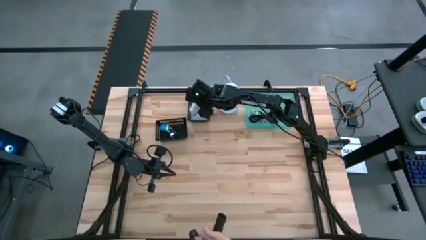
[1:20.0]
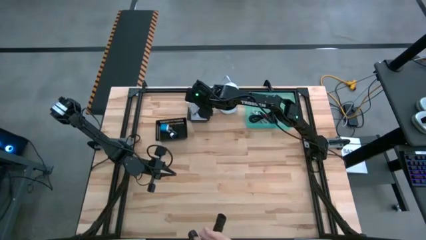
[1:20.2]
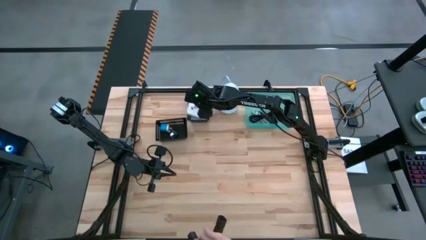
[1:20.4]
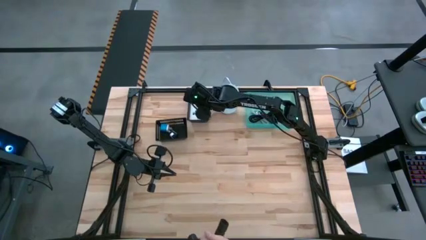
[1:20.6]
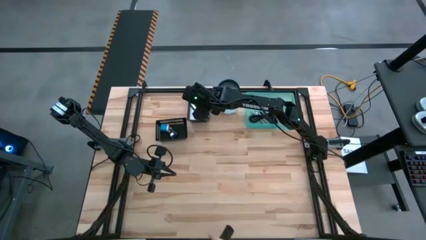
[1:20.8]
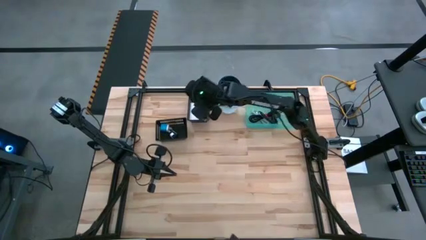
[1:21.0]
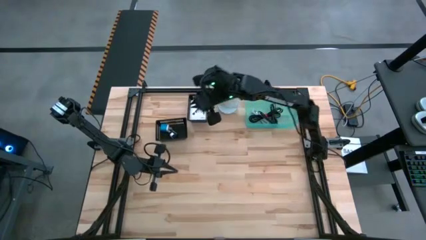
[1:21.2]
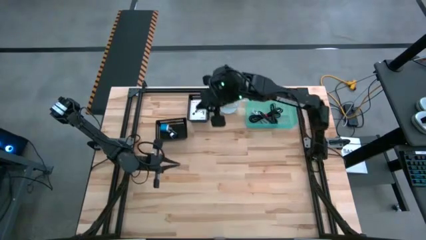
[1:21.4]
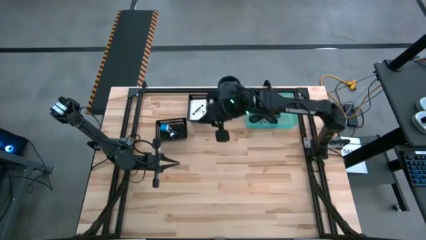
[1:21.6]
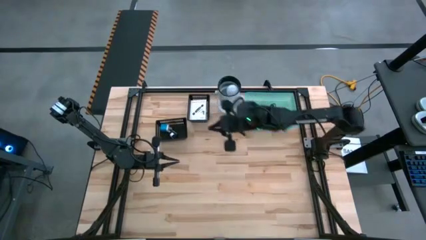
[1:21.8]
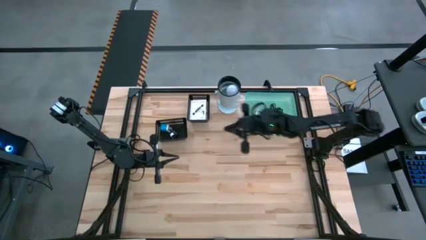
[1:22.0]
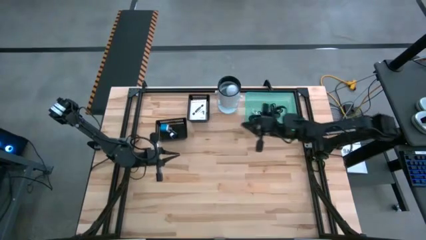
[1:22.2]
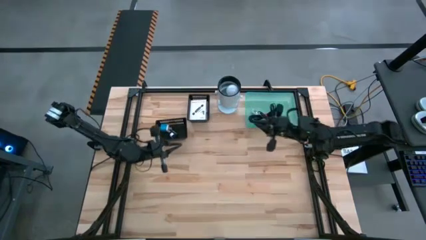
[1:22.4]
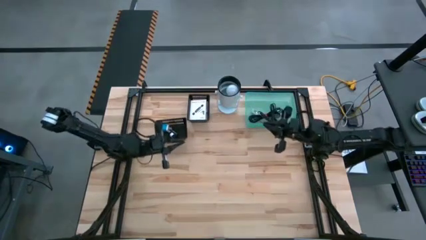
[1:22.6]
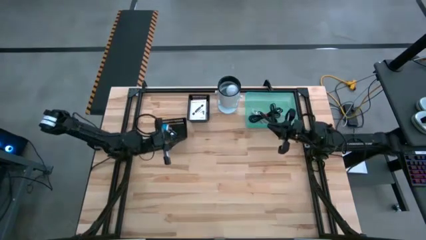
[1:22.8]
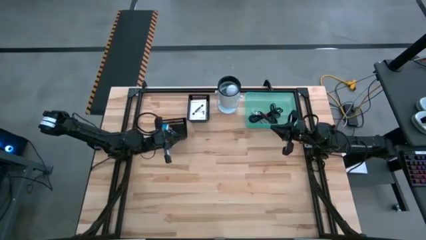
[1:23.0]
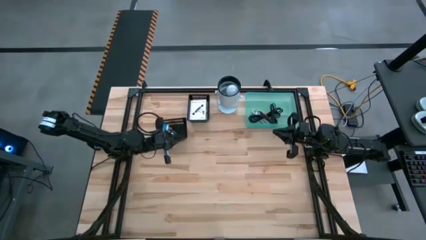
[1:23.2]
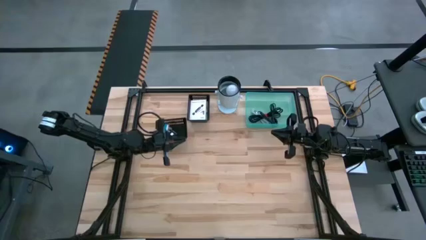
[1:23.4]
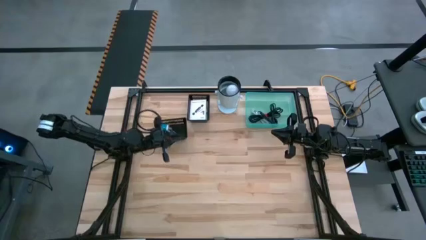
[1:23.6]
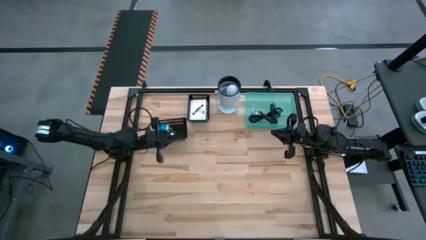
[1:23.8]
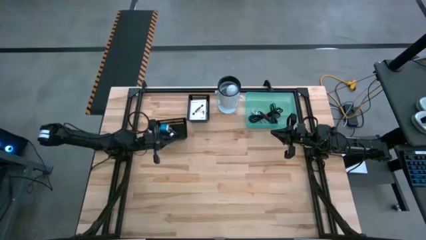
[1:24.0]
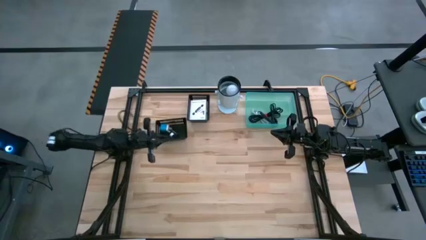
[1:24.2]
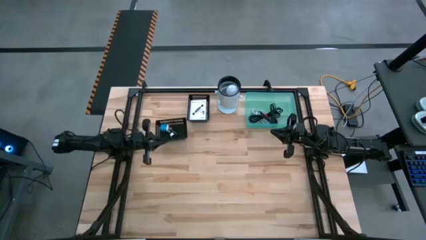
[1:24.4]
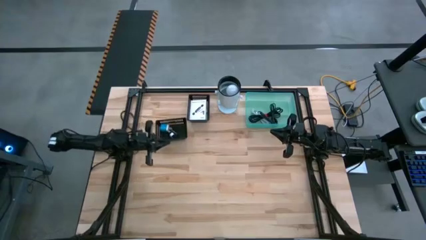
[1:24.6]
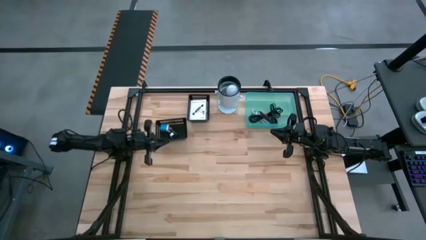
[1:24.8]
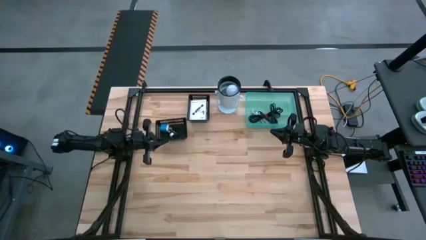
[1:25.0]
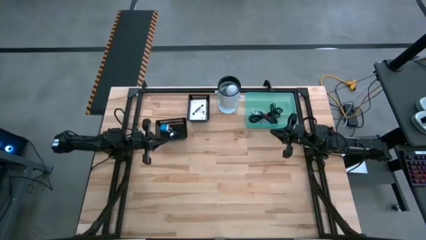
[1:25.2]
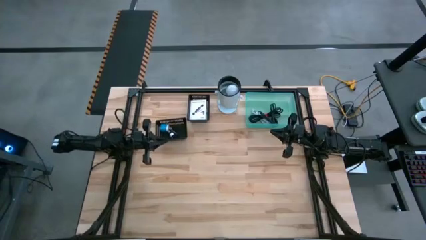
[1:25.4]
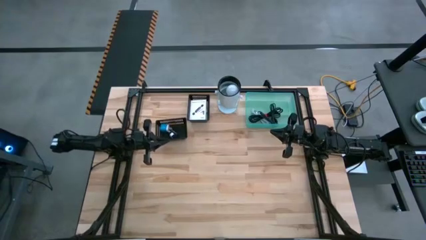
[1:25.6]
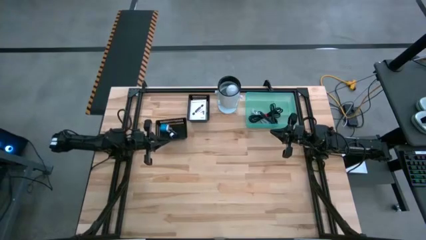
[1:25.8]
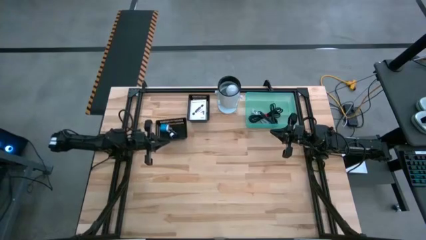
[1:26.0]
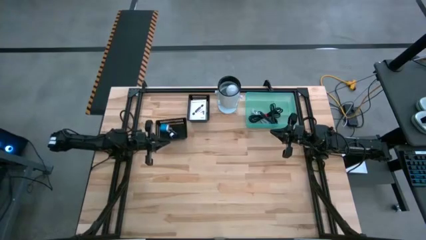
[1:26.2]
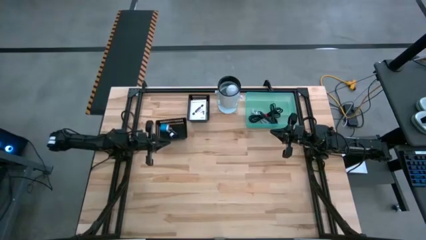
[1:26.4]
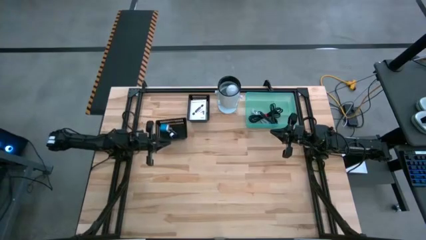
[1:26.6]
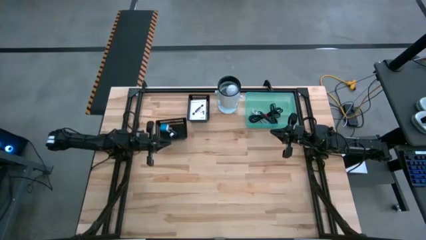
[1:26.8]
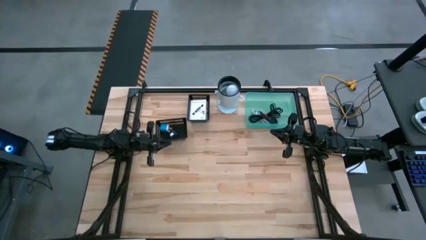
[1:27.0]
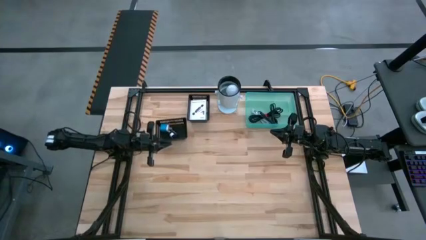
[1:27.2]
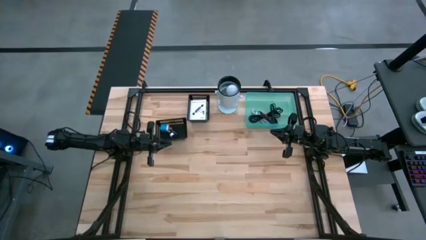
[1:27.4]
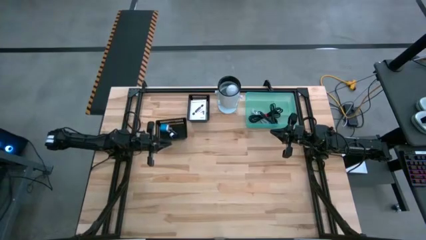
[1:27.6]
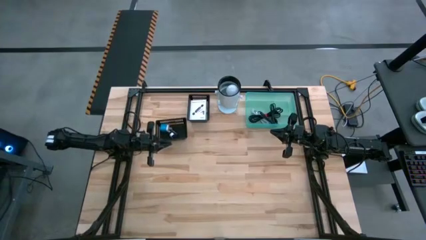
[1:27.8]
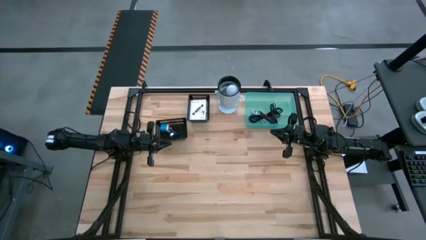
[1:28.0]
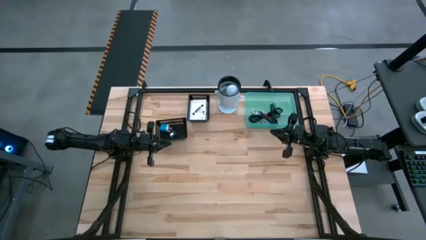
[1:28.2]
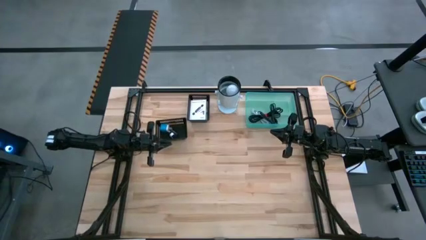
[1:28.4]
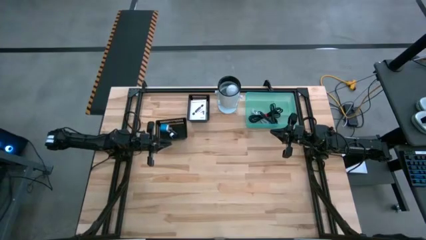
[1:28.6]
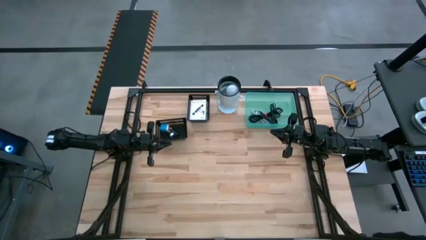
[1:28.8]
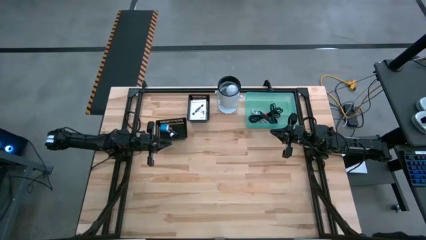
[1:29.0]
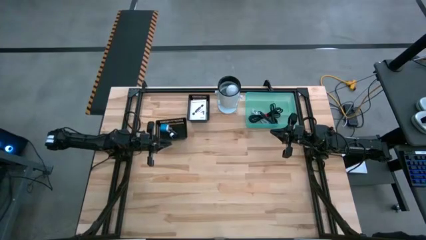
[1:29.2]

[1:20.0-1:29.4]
Task: Pick and place items into bin
Return to Home Position

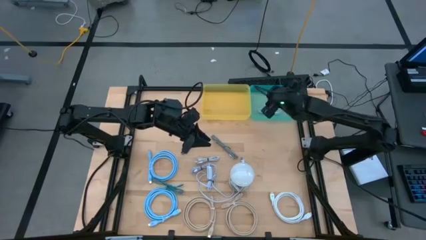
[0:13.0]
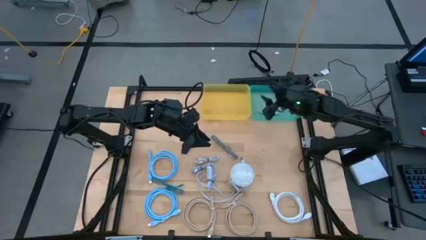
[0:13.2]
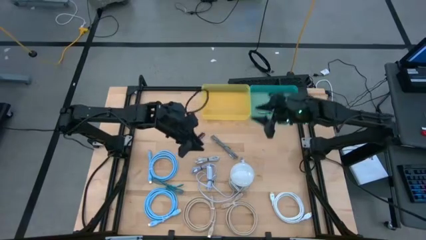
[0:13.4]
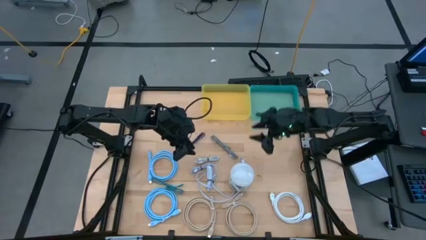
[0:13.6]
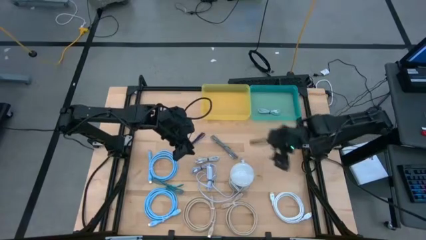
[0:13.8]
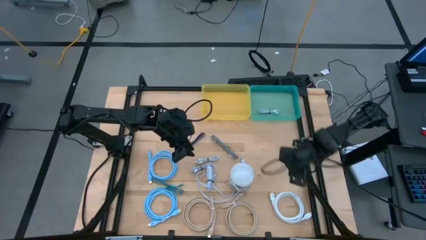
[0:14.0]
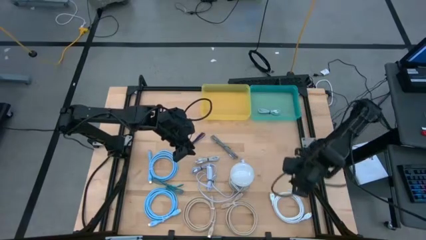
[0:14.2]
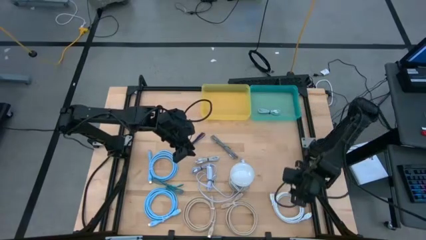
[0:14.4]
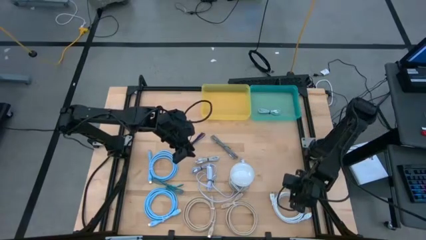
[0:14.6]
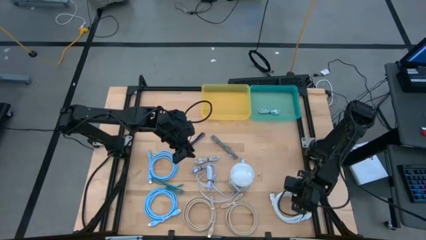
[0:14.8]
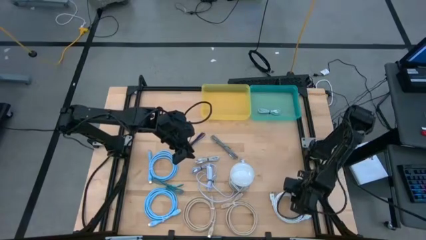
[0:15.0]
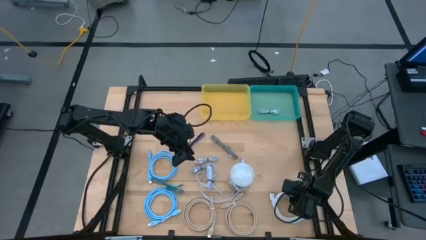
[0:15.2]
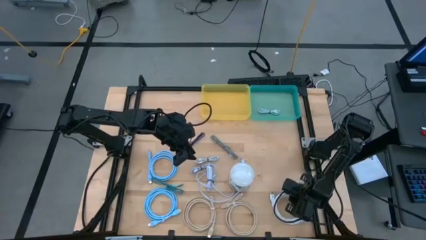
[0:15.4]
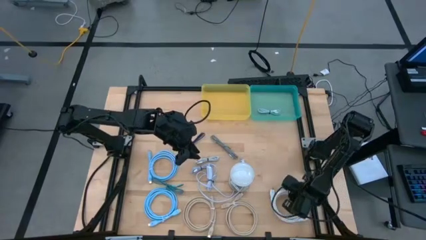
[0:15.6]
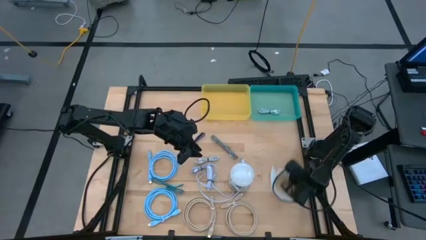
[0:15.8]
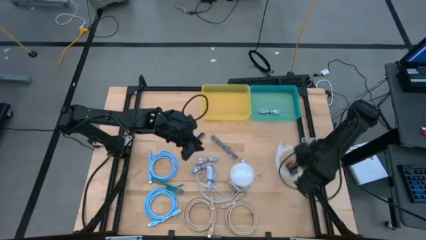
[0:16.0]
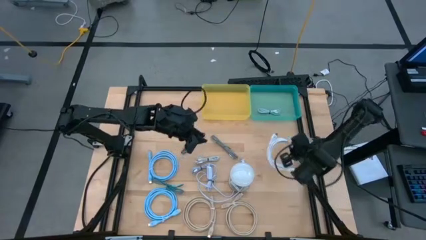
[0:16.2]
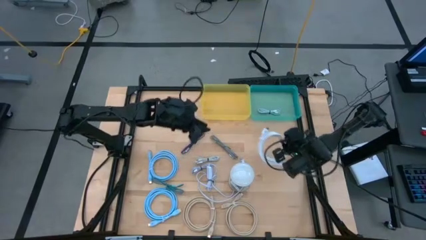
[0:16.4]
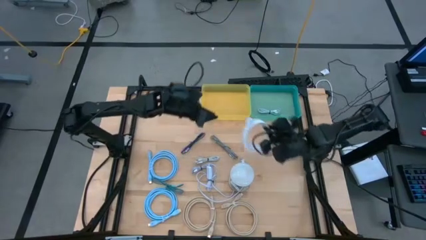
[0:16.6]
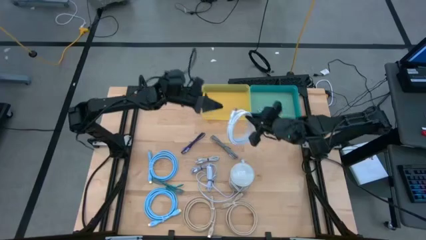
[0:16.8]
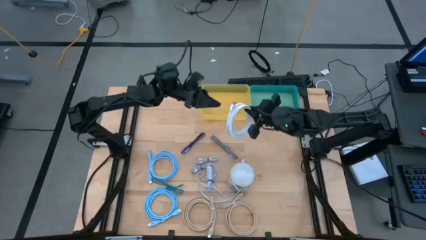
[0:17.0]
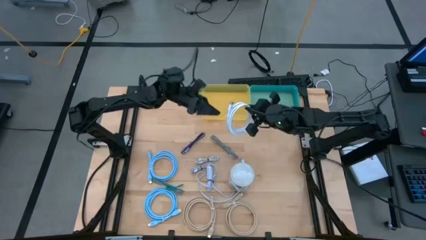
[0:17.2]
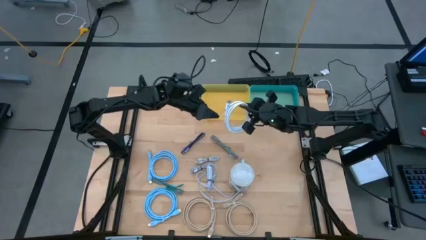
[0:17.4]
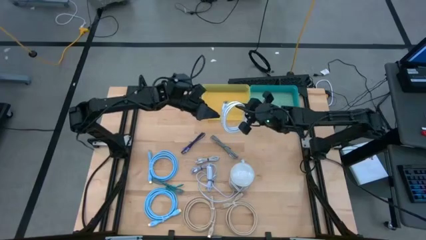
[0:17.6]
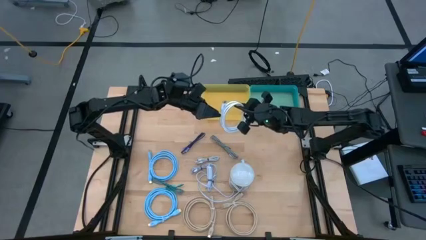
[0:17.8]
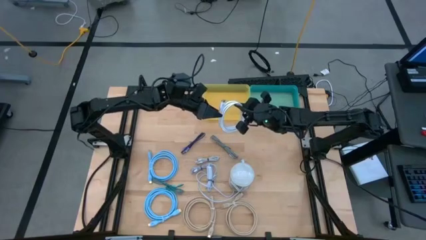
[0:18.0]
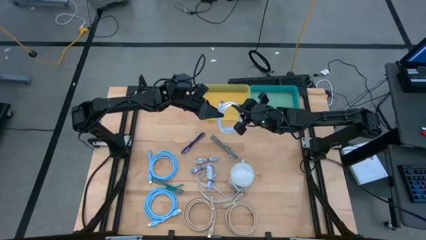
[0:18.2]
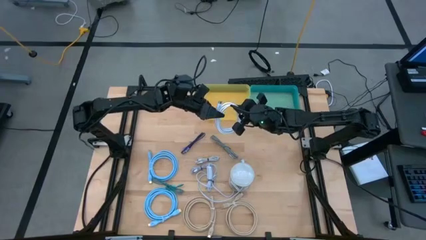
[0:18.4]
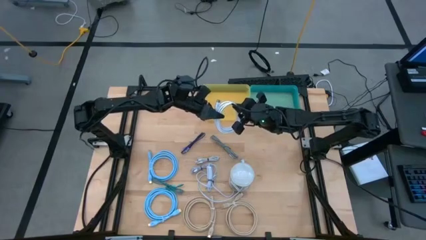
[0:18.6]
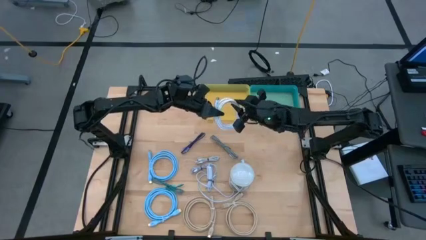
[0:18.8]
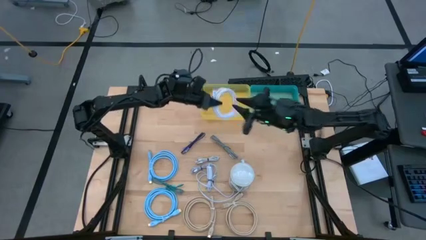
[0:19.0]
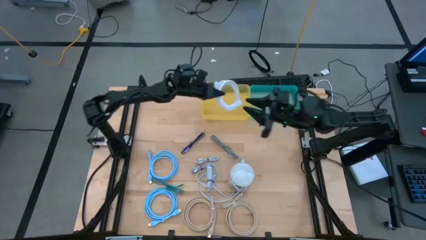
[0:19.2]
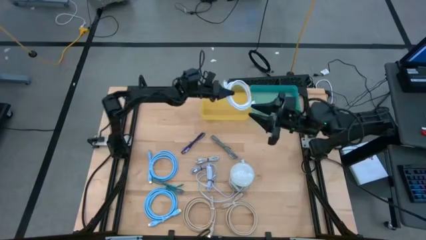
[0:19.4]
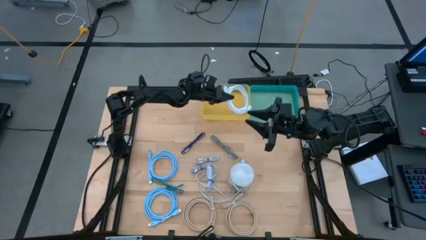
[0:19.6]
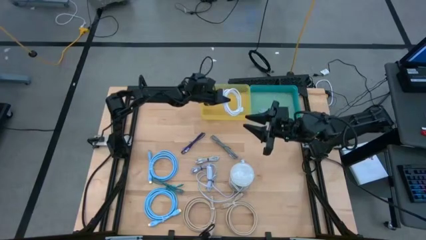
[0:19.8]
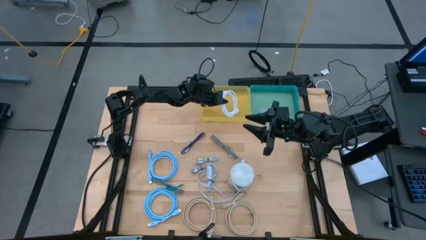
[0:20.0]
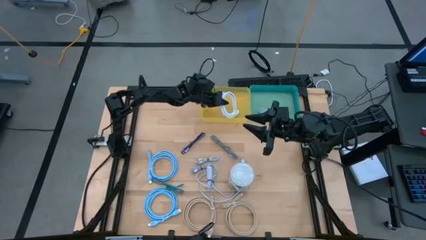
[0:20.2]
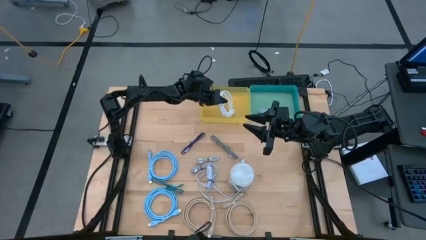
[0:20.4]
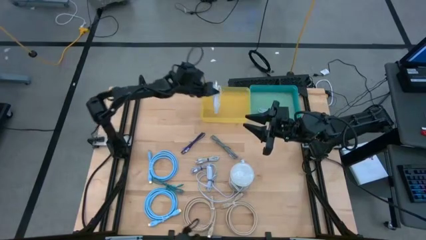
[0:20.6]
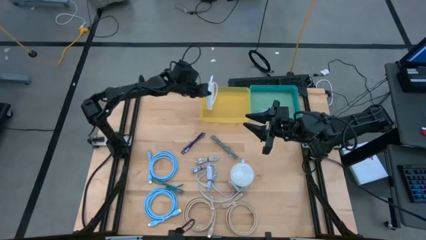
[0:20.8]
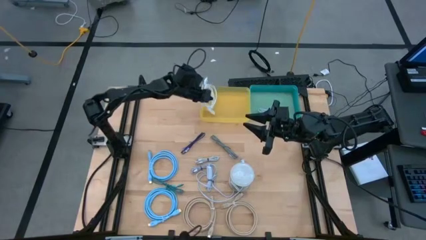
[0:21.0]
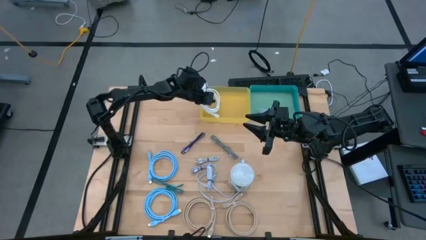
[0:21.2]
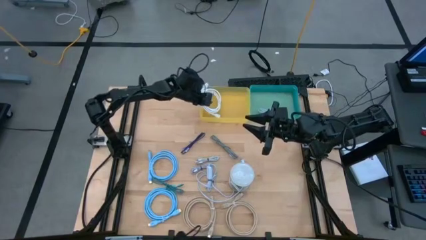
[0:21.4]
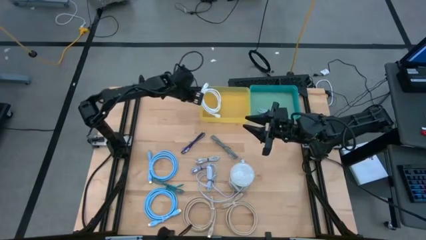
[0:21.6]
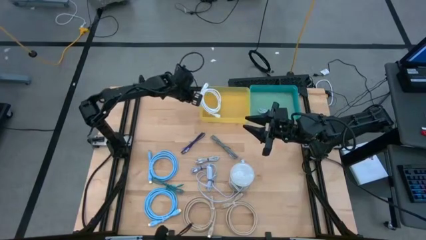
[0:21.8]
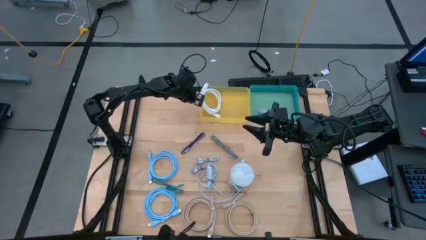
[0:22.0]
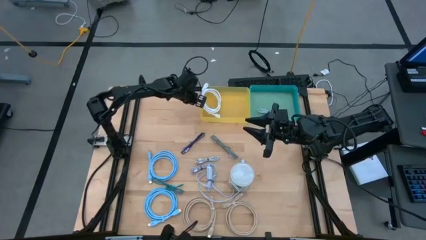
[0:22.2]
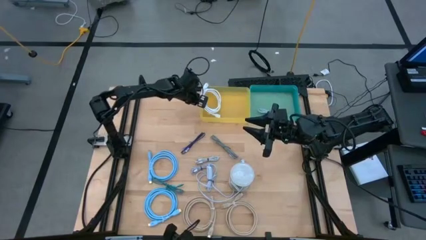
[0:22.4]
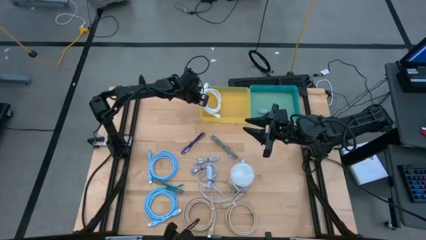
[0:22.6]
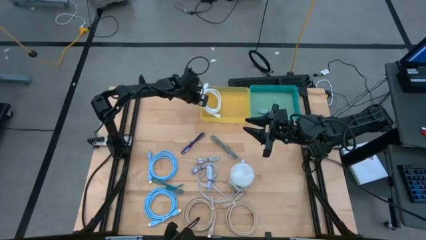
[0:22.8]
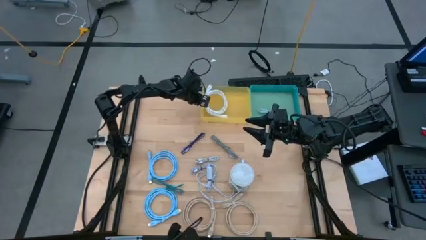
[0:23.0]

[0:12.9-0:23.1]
Task: Pick & Place USB Port
Put the white HDMI cable into the yellow bin
